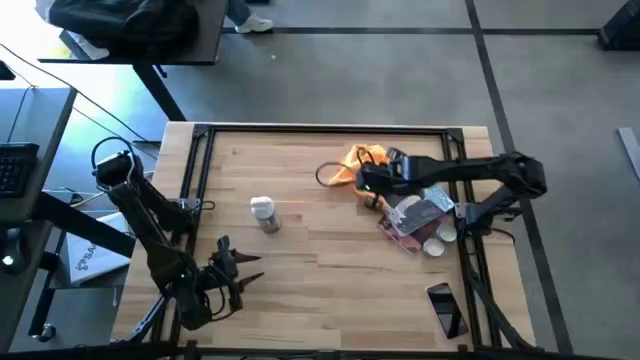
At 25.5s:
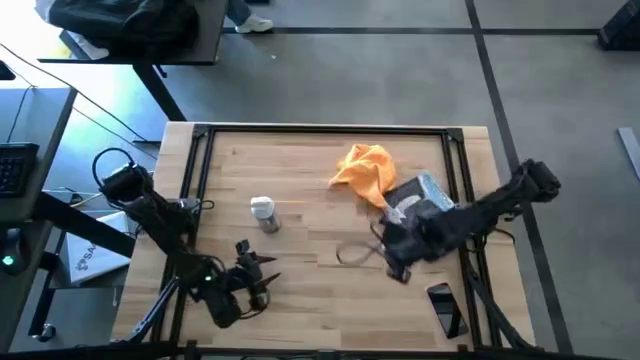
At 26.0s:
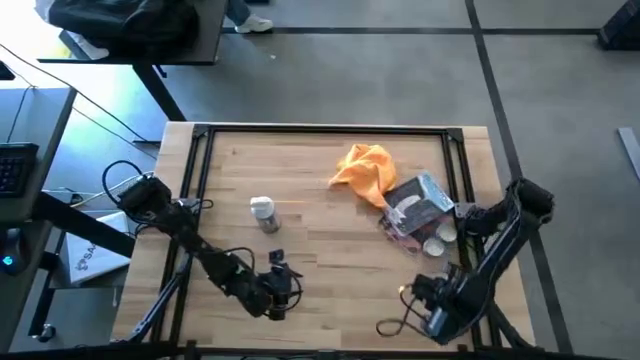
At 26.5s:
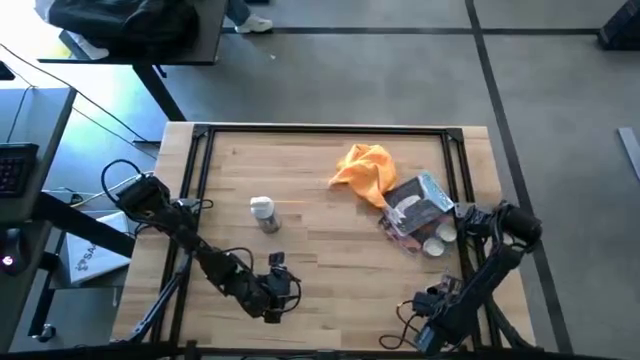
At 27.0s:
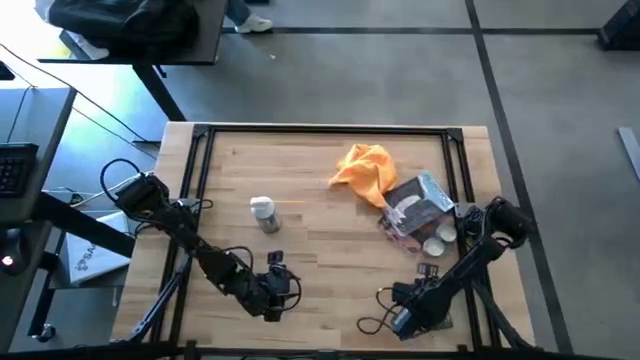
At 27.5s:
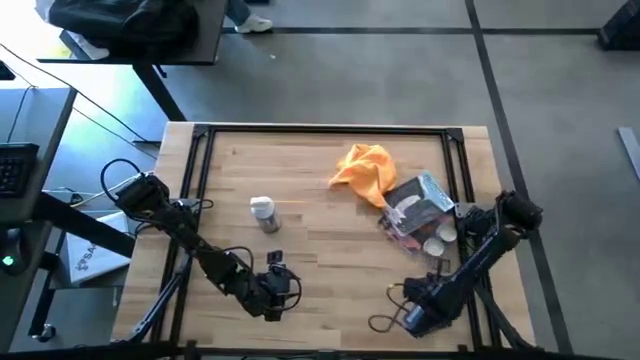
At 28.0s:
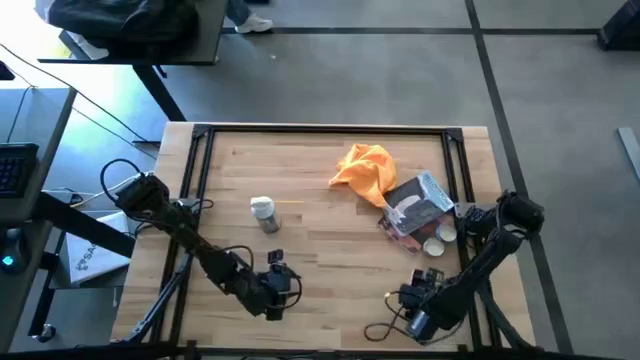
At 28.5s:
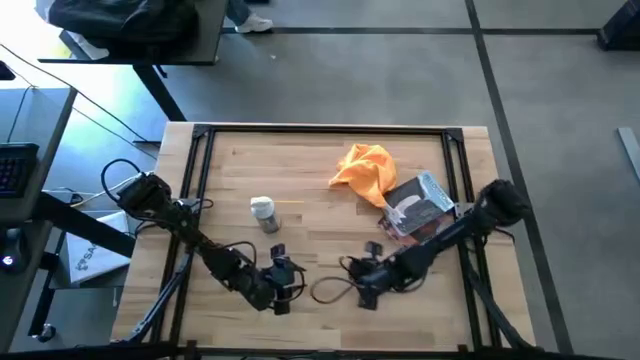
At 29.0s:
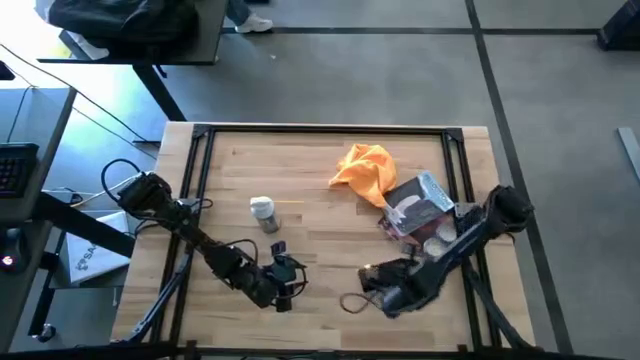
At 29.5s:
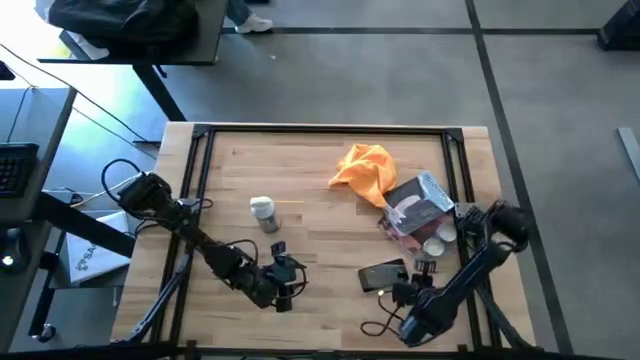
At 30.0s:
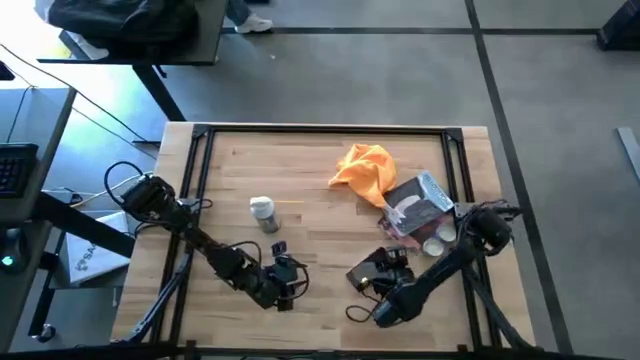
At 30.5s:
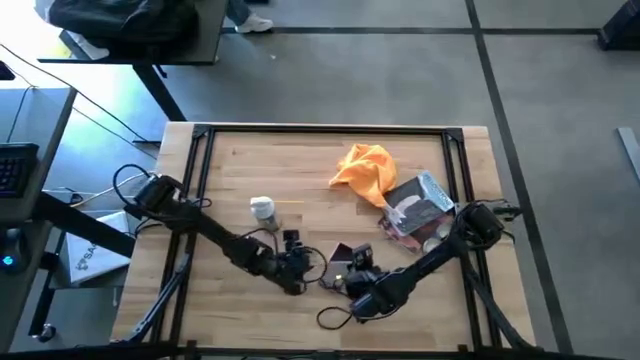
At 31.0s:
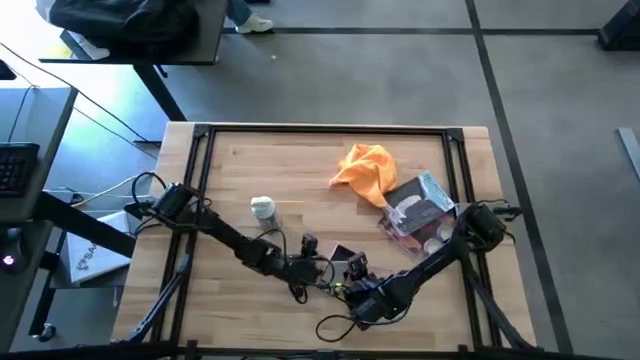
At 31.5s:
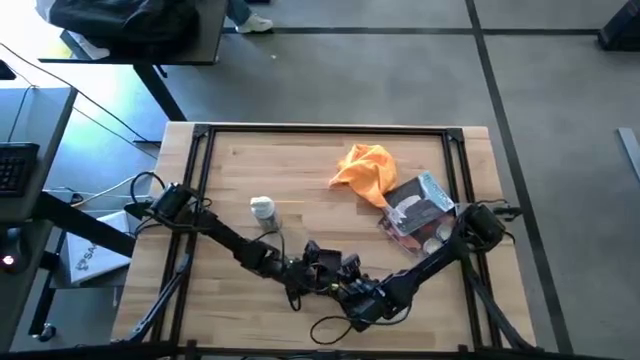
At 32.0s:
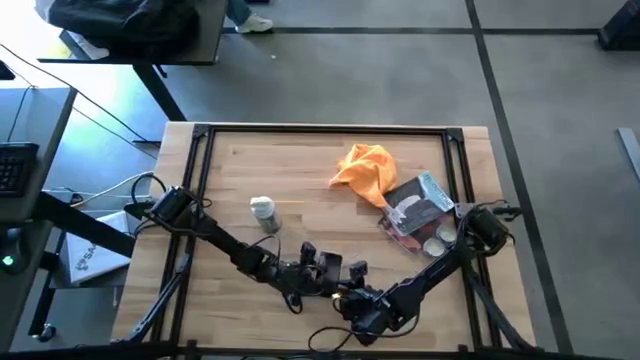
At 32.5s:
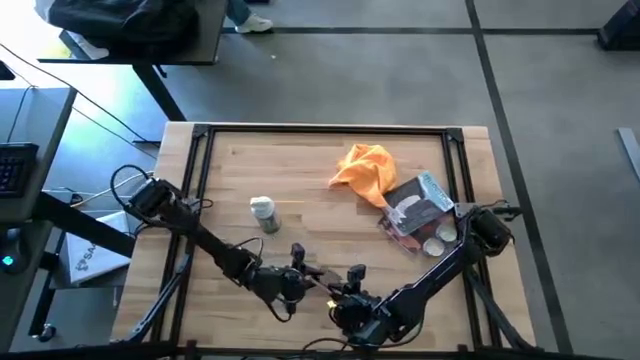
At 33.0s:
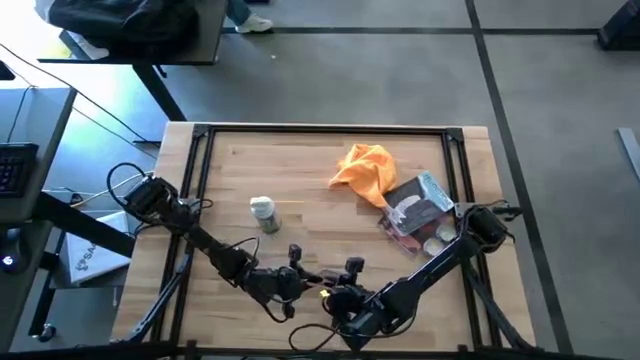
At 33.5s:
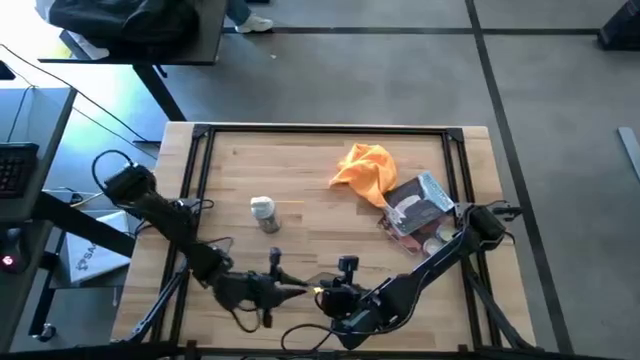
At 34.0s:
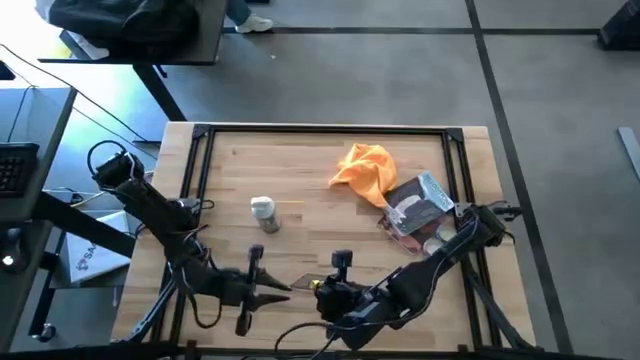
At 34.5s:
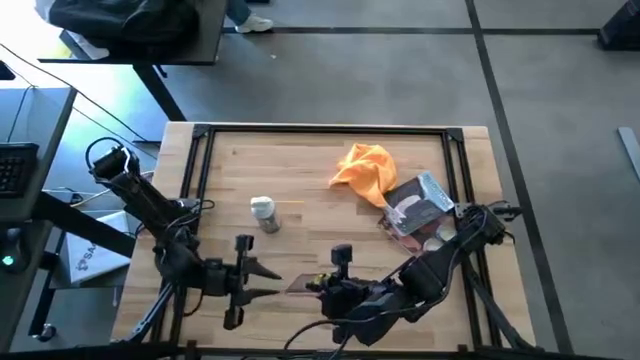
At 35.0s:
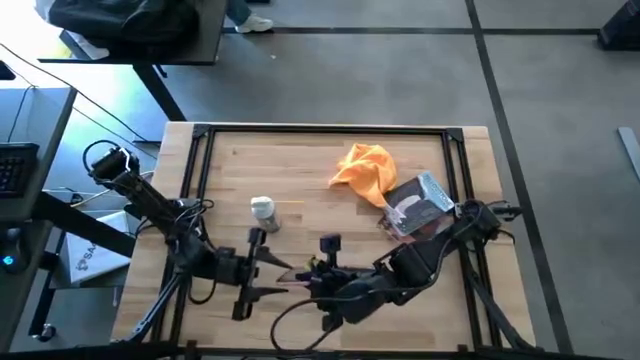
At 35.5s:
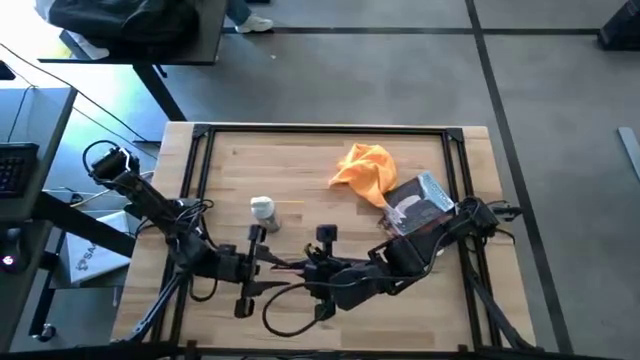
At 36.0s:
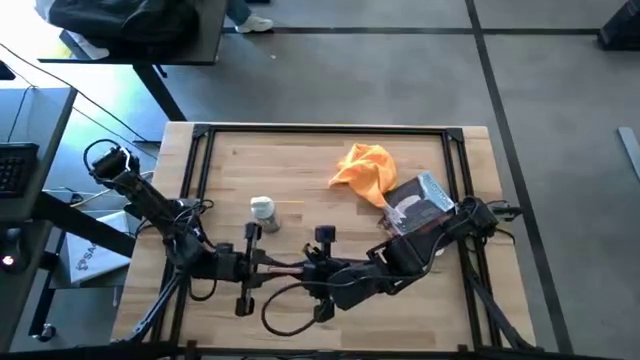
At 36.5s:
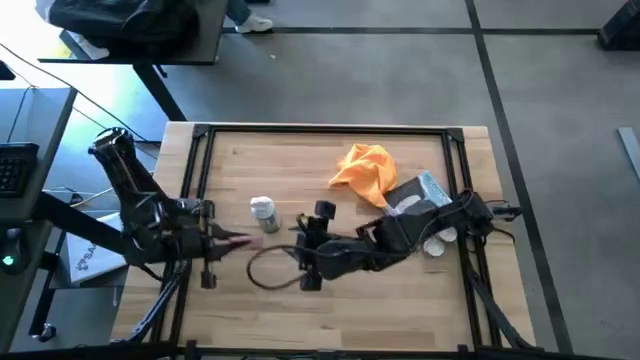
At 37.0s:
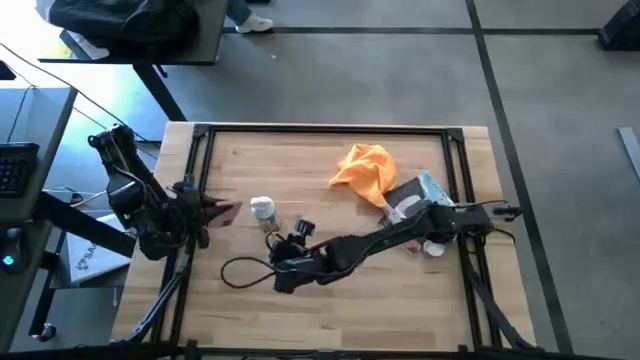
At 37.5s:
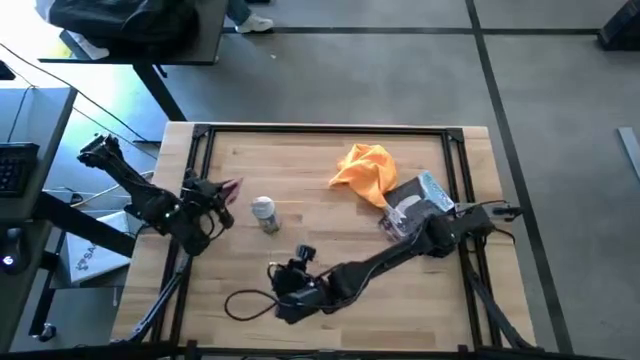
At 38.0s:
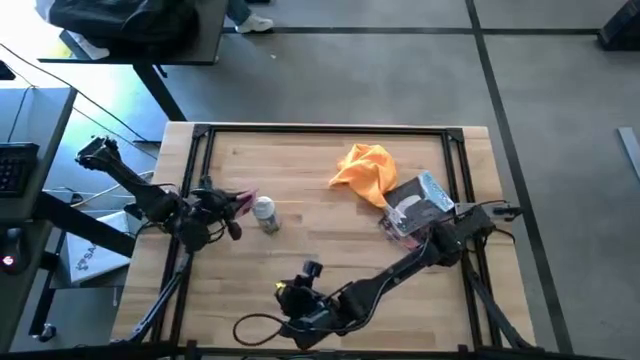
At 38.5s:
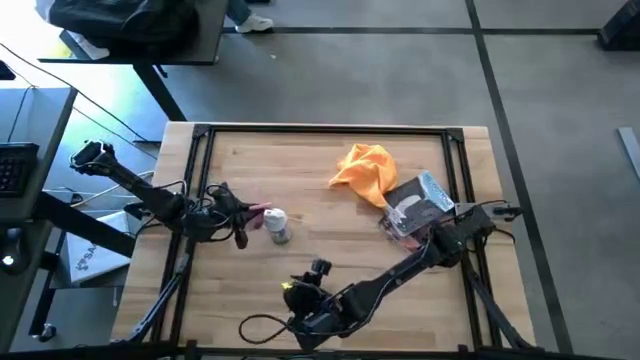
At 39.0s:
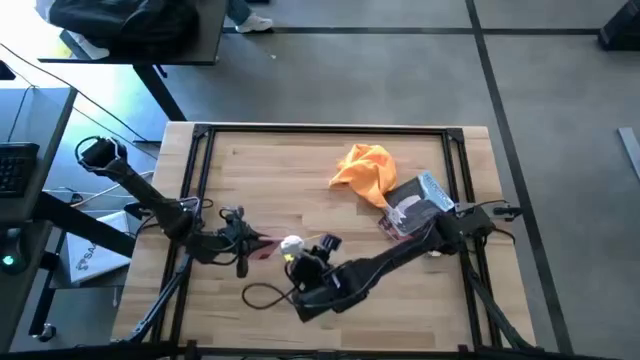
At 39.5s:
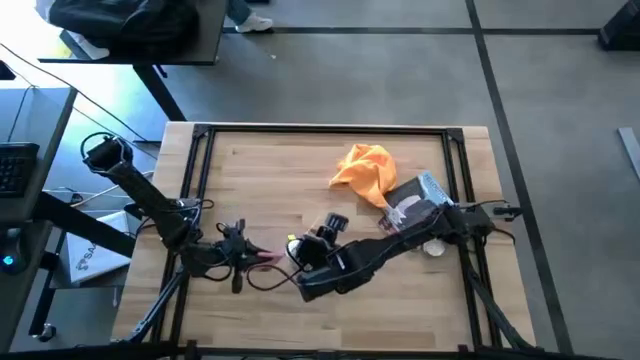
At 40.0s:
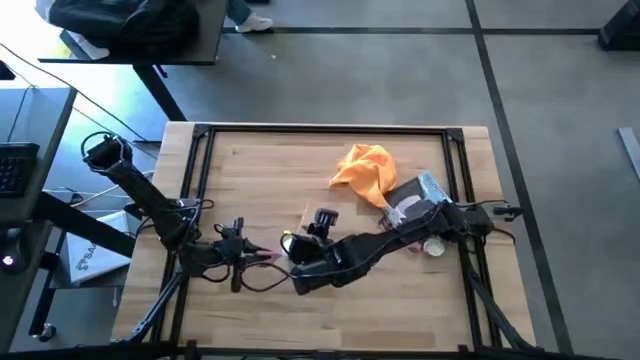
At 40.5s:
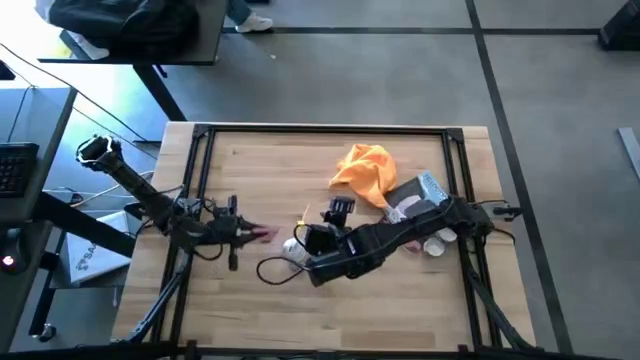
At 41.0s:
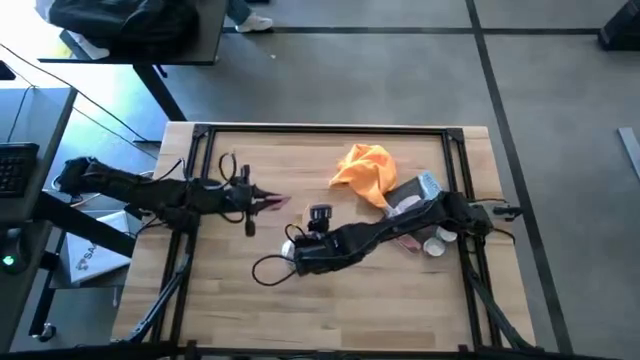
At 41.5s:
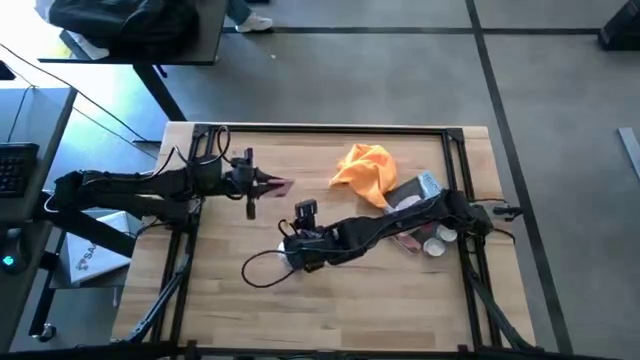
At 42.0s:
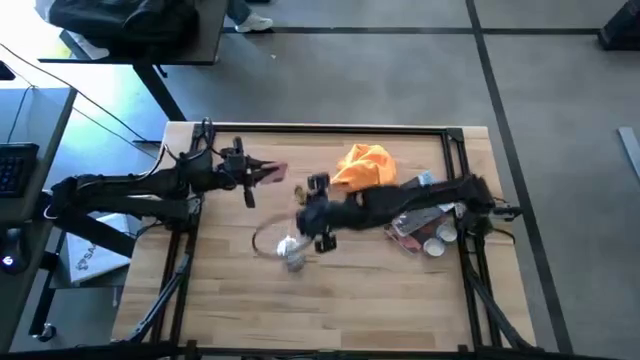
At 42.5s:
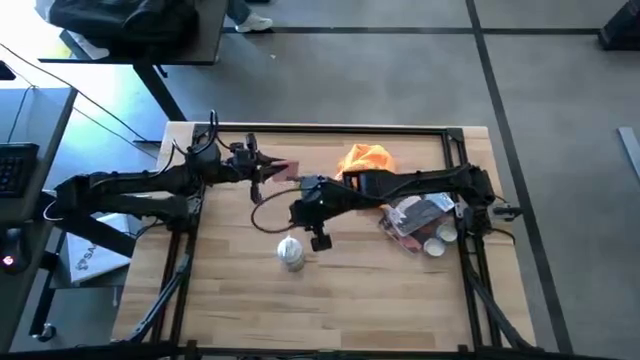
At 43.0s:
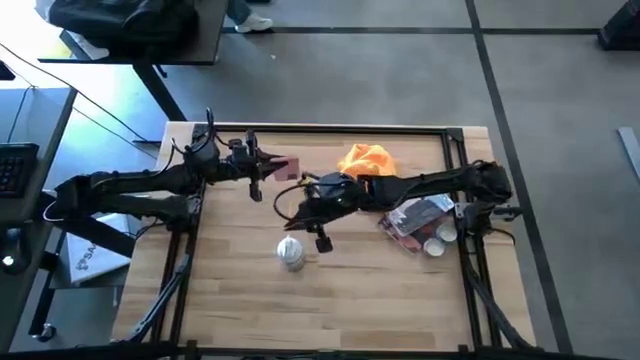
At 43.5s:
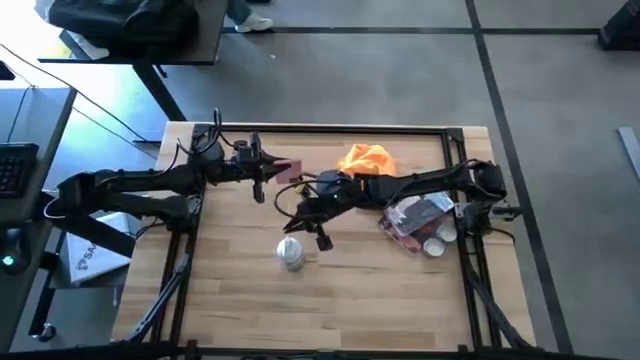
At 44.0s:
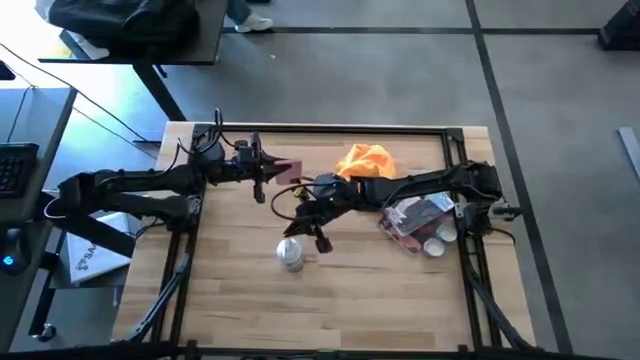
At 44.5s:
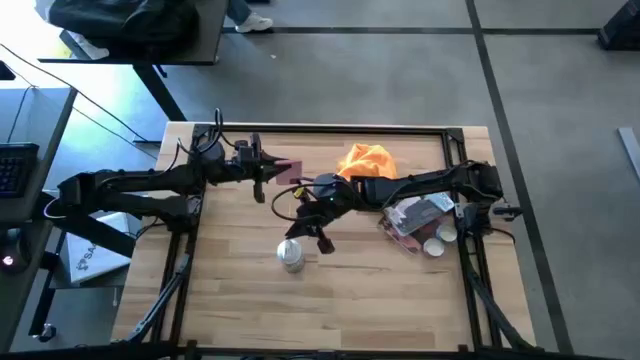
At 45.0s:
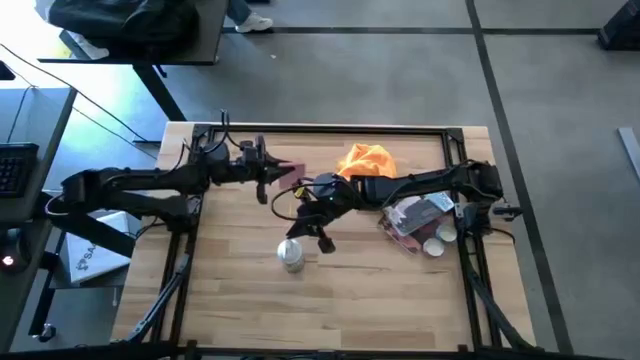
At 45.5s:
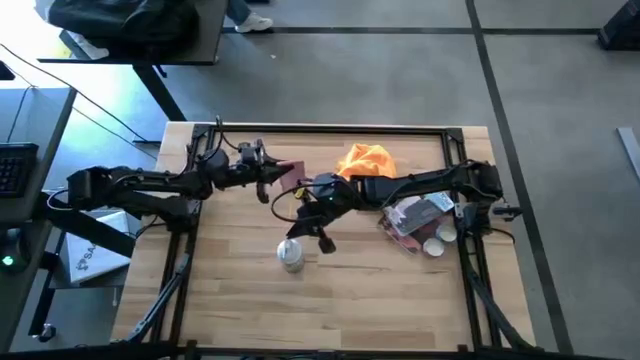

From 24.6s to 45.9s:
Task: Apply microfiber cloth
Spray the front and back of the cellphone using the spray bottle
